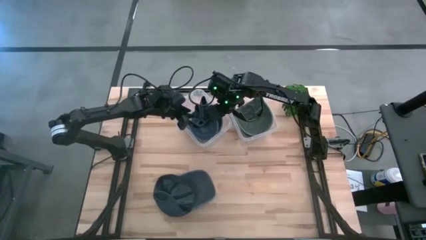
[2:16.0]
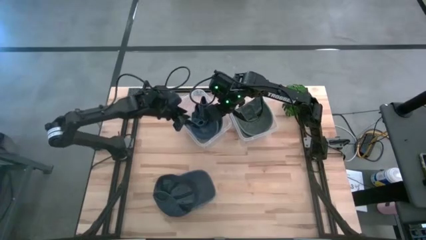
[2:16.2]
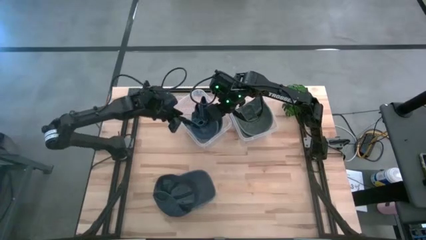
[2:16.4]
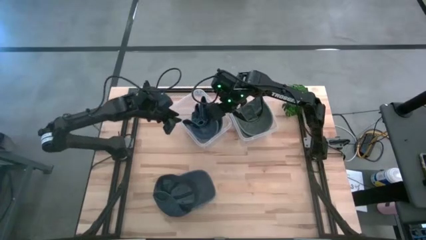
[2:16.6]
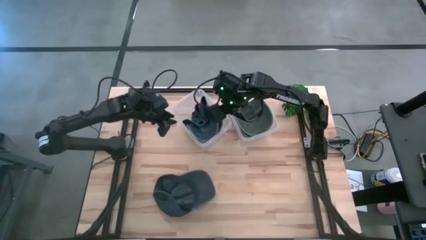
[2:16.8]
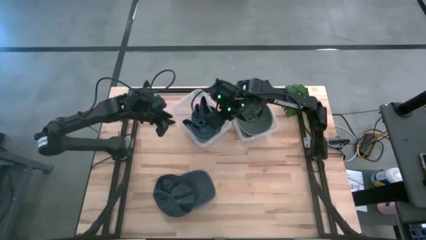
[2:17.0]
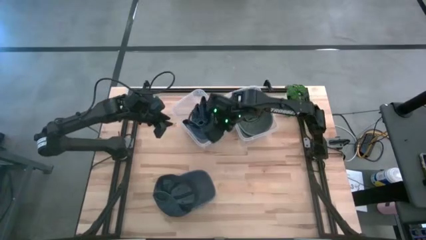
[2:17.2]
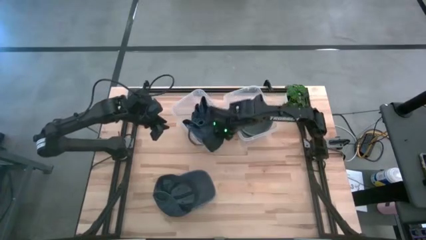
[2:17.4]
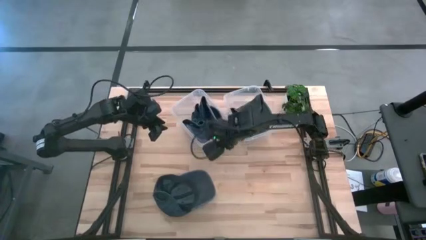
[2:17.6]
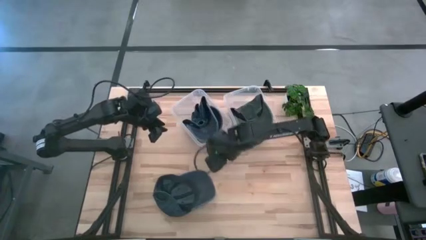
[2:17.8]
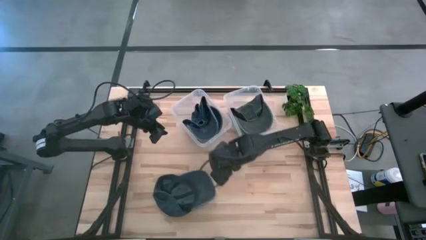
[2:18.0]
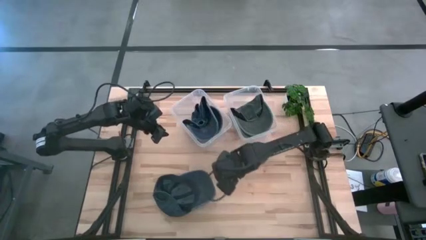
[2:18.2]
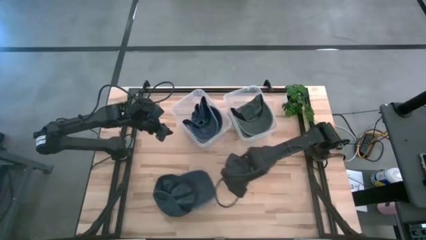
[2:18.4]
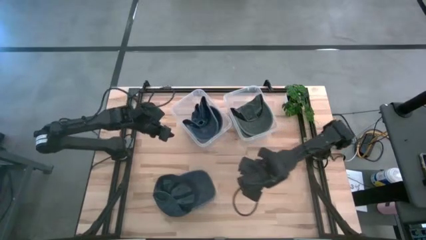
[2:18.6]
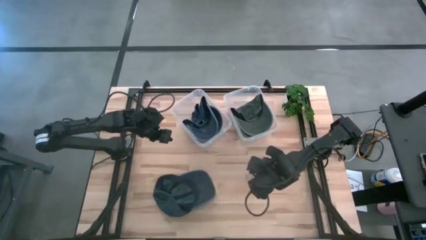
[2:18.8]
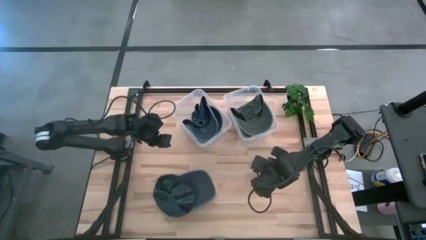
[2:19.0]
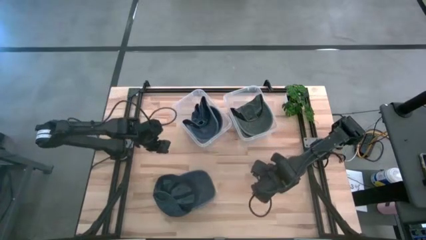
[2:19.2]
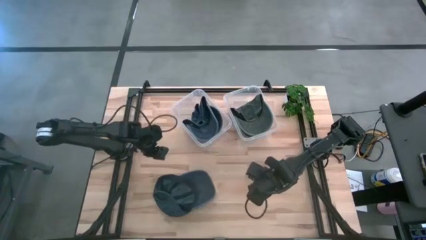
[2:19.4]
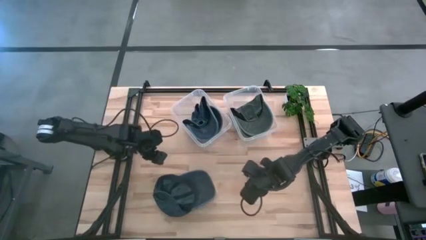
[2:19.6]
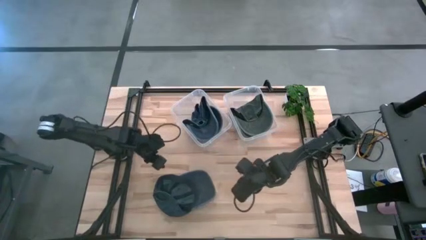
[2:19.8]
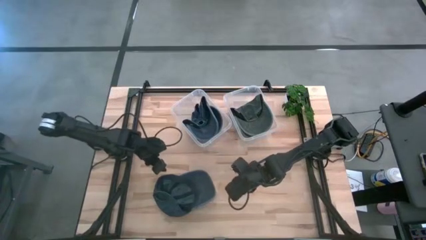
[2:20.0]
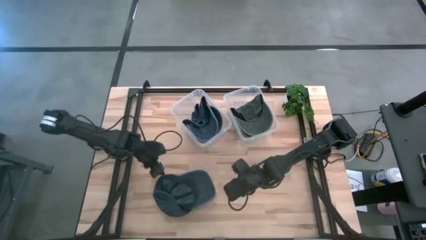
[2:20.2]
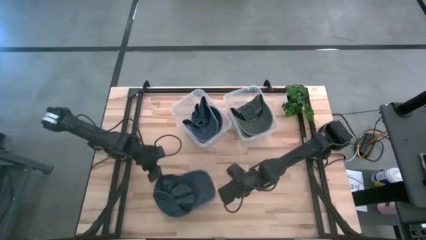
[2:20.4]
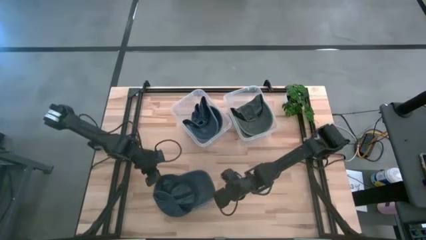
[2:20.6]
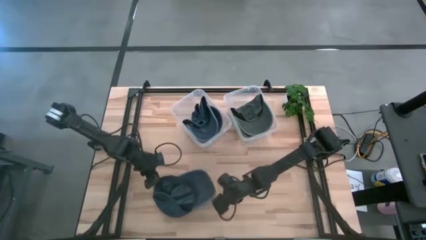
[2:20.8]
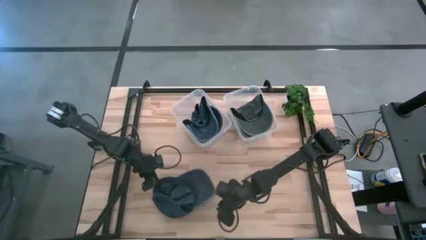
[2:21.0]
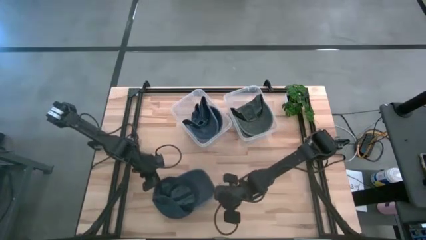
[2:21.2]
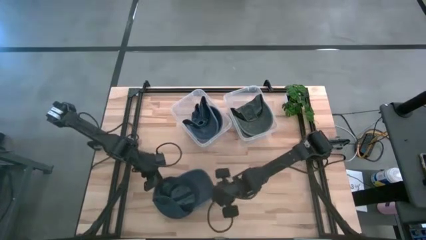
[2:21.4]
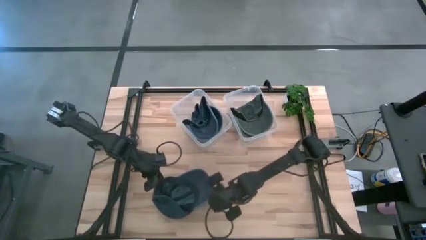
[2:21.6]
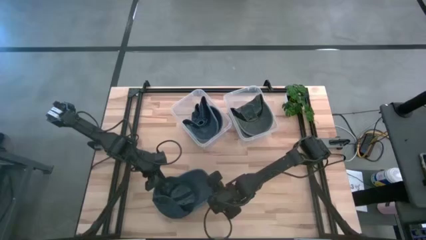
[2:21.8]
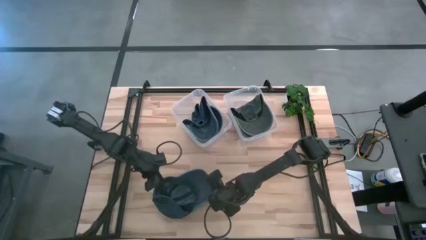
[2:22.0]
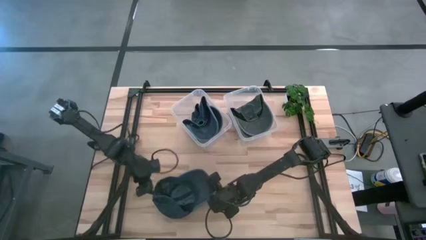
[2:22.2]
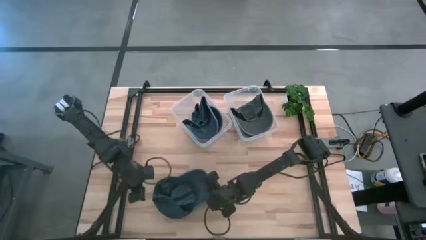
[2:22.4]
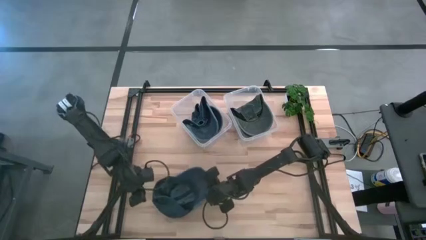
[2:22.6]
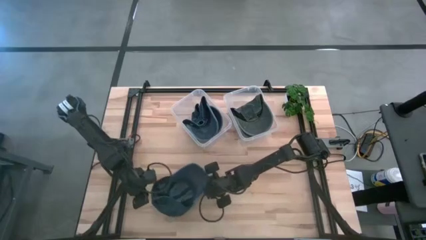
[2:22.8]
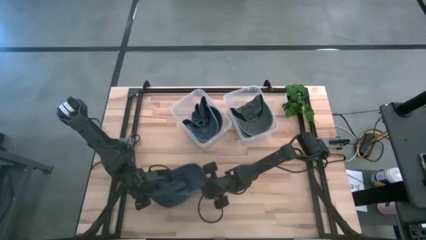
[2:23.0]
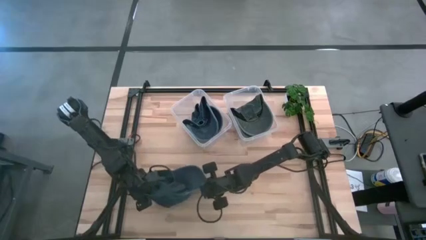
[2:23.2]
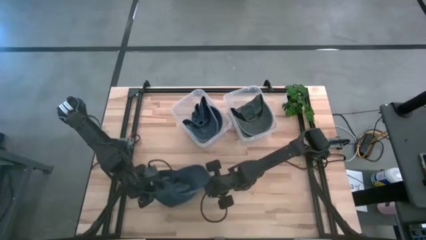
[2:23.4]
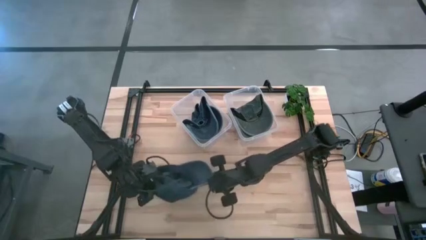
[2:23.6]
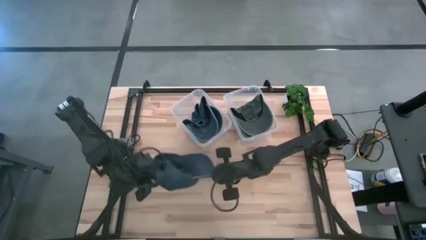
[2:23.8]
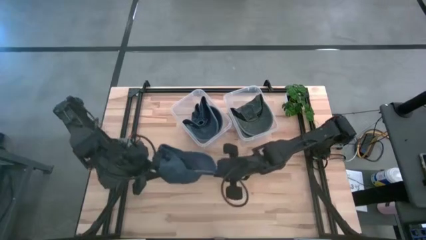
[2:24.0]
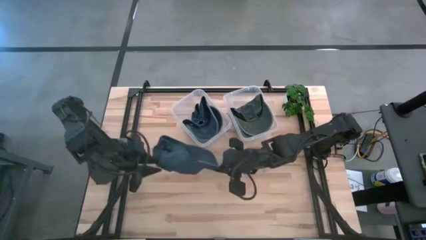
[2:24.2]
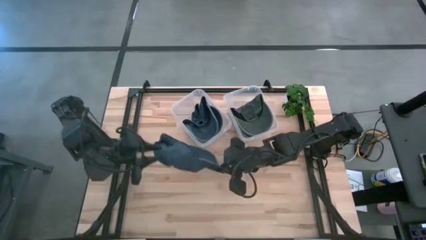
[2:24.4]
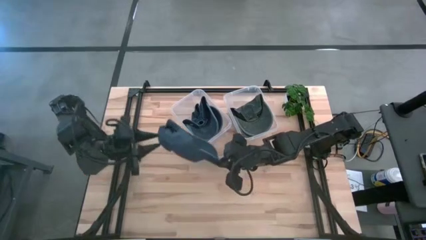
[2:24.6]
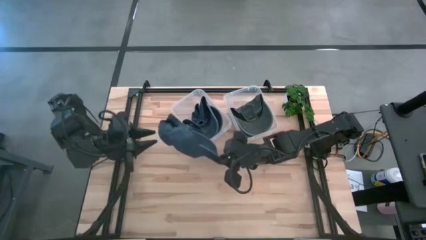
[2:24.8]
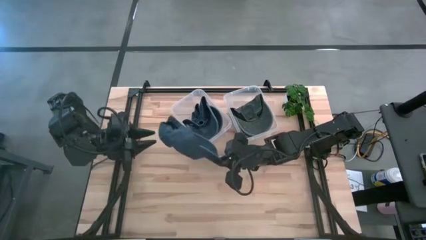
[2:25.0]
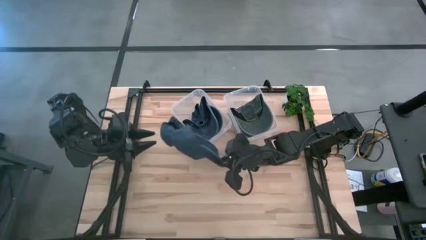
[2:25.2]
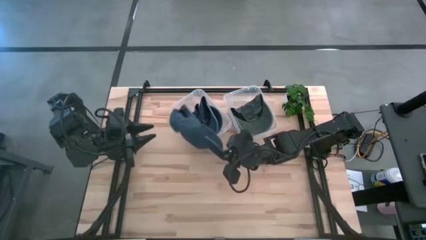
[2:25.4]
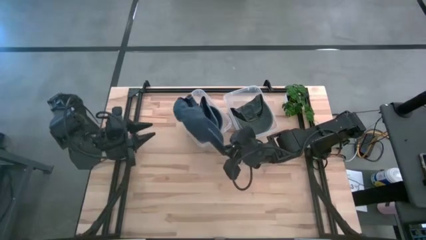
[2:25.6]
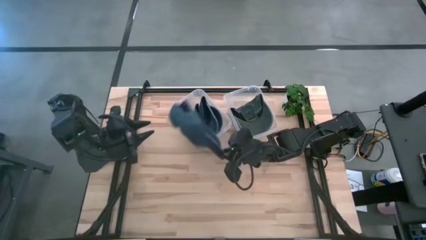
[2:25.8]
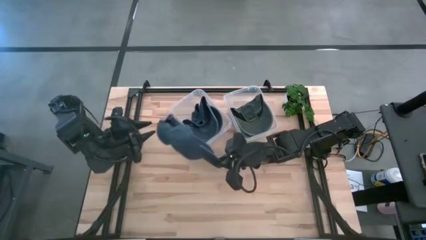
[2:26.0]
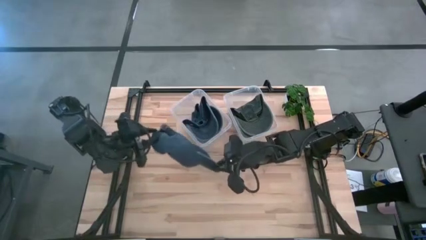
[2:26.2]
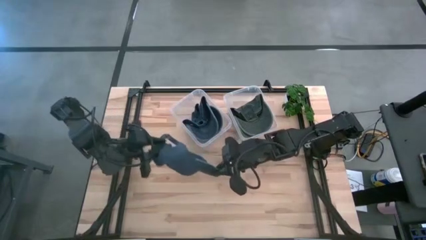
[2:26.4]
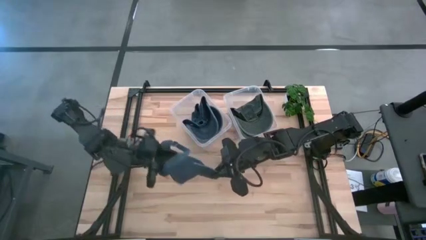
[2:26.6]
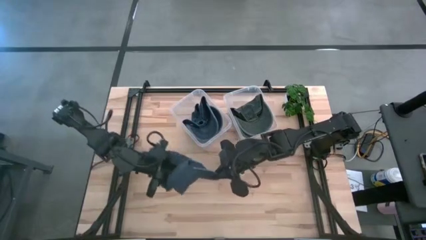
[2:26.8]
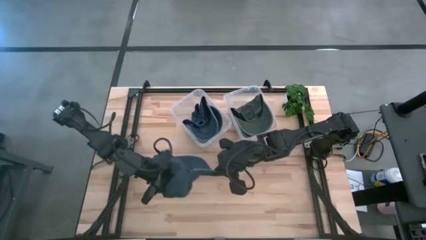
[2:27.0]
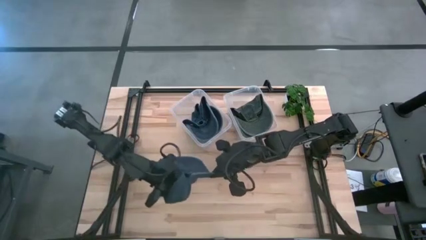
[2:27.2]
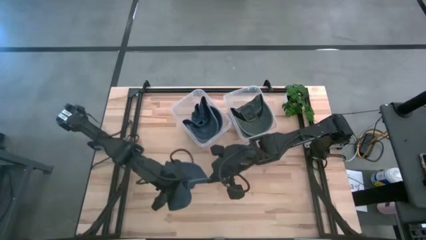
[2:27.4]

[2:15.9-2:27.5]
Task: Pick & Place hat
Put the blue cap into the left bin

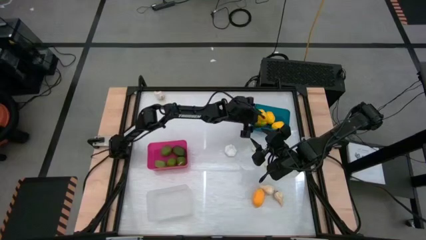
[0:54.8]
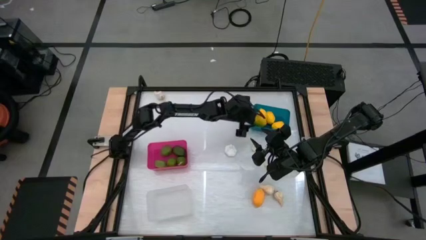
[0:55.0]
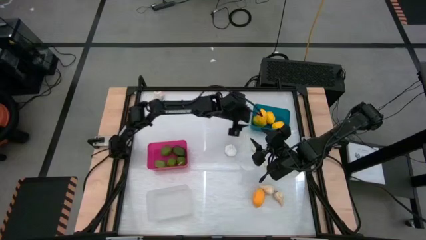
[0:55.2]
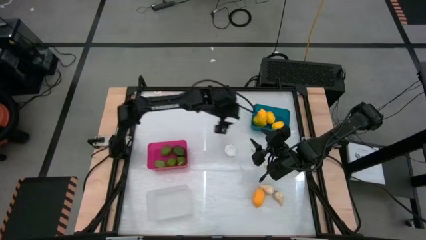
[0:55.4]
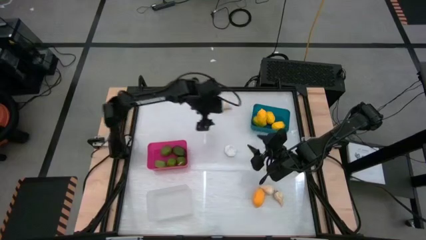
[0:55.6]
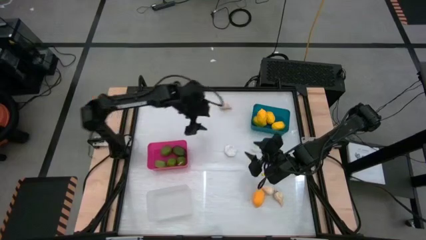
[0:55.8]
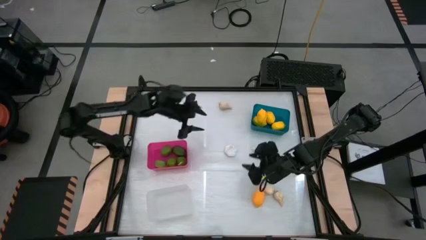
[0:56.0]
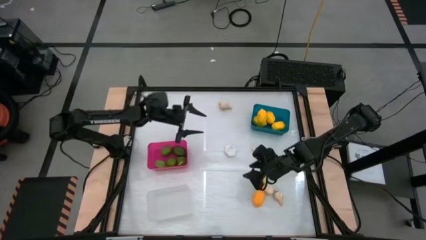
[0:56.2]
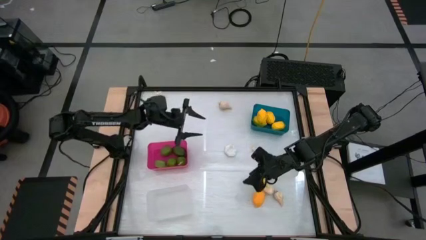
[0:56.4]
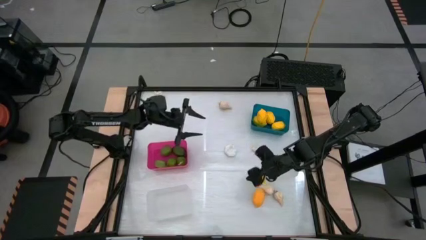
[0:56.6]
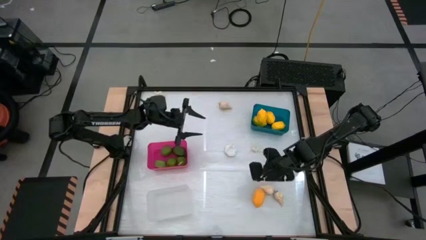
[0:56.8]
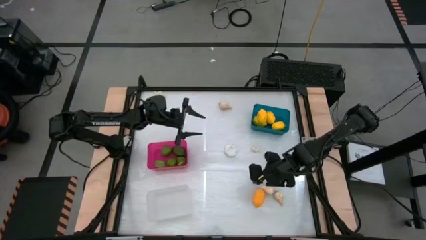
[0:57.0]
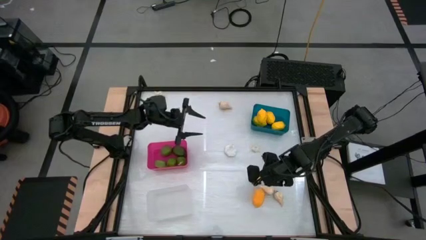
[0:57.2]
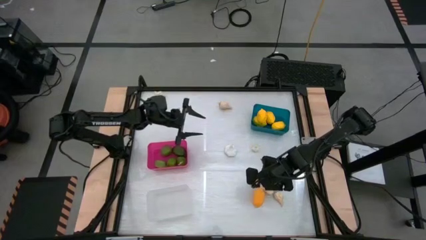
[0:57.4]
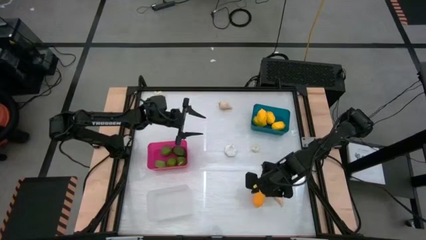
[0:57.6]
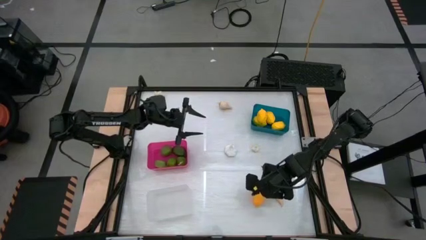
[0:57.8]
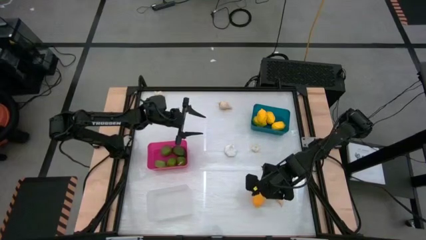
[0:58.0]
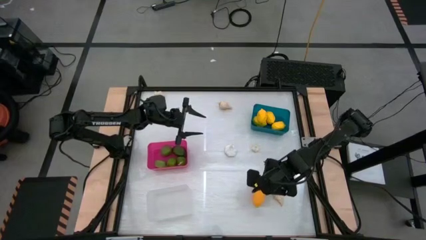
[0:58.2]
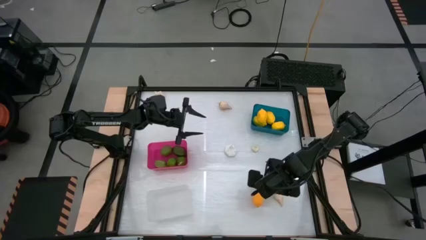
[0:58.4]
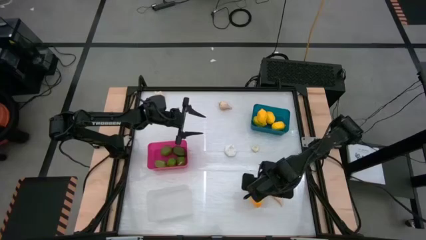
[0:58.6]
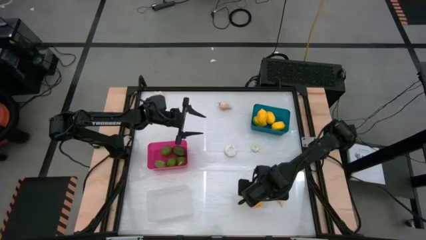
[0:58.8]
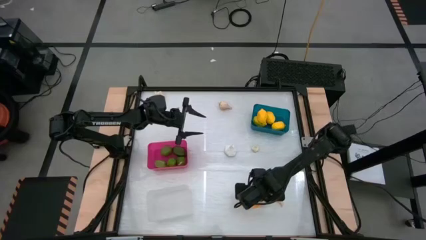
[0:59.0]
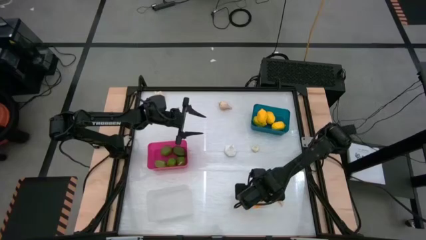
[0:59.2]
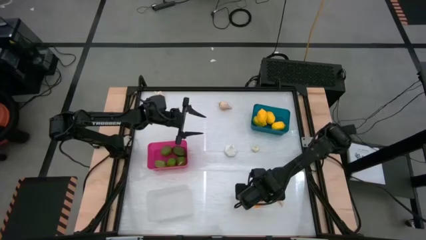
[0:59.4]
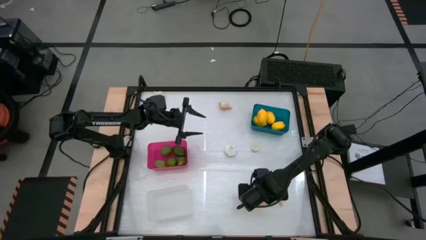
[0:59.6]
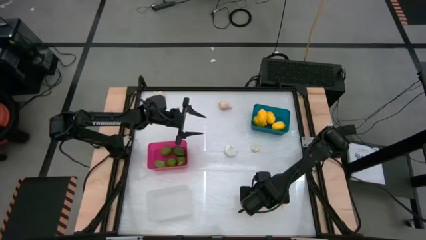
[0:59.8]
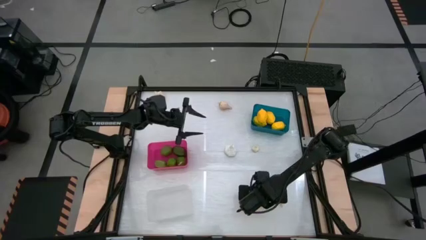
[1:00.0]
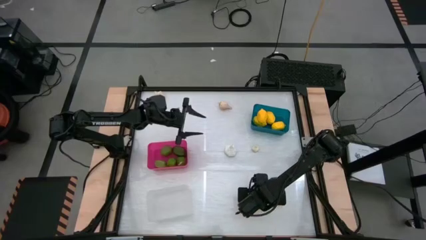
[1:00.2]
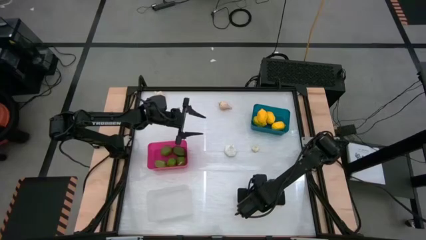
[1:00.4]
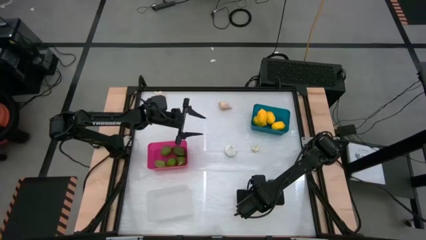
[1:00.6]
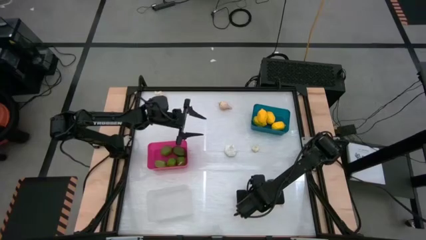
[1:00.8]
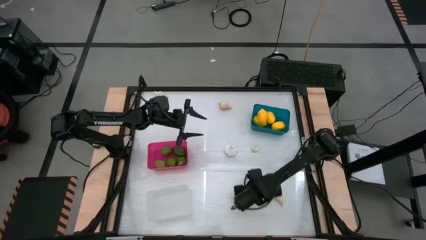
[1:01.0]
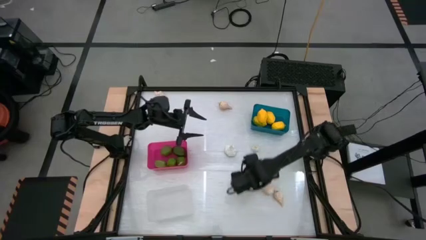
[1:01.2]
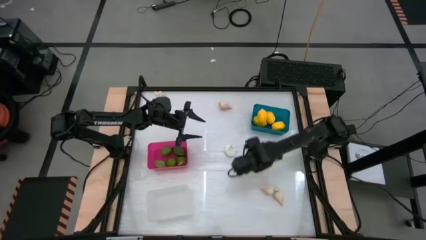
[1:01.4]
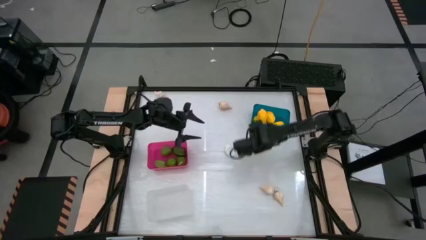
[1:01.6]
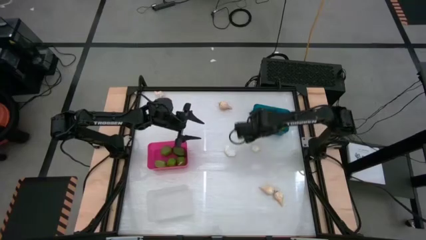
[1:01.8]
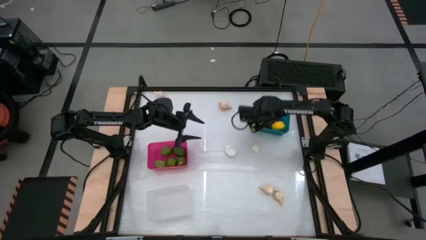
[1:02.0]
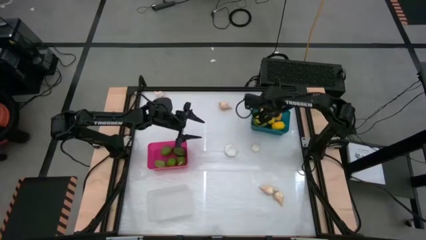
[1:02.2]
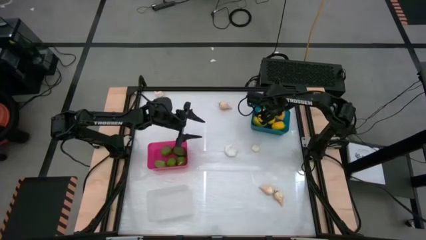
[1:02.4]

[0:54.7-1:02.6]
Task: Sort produce into baskets
Put the lemon into the blue bin
